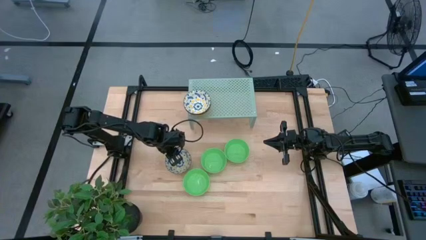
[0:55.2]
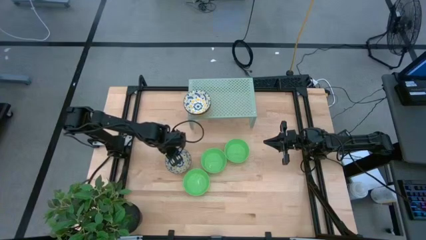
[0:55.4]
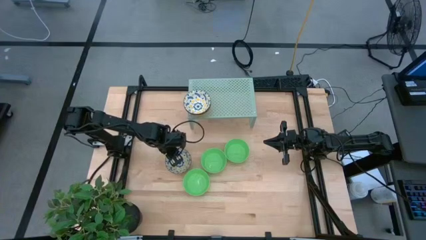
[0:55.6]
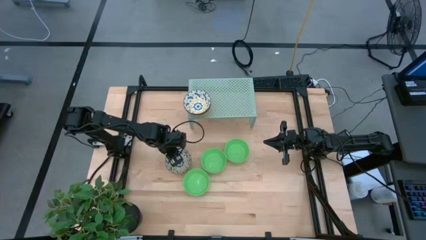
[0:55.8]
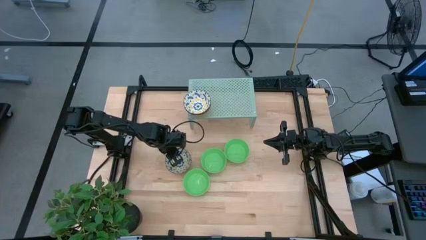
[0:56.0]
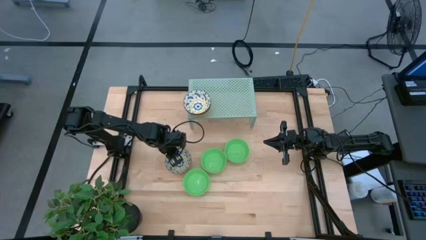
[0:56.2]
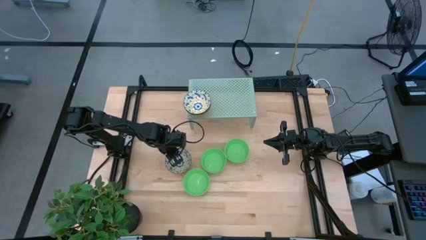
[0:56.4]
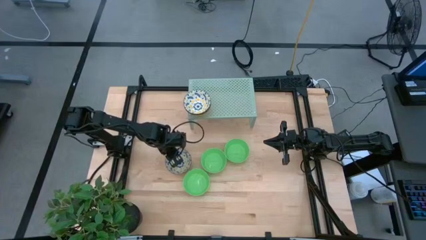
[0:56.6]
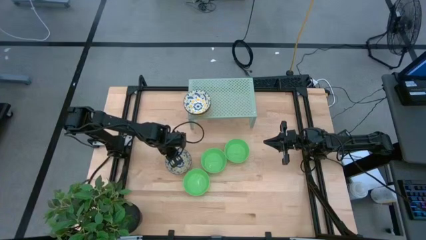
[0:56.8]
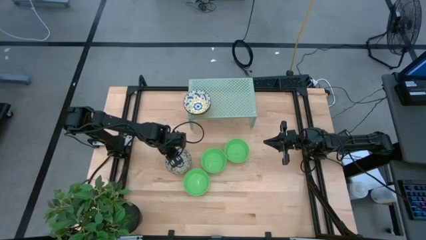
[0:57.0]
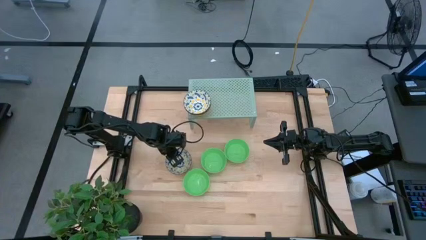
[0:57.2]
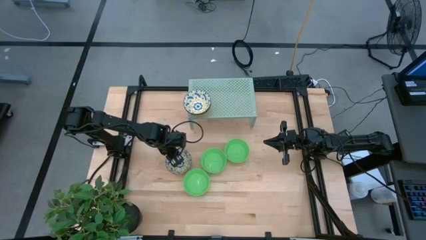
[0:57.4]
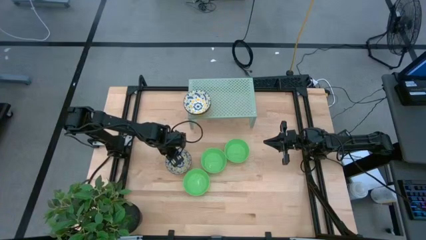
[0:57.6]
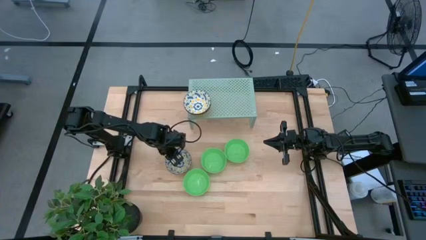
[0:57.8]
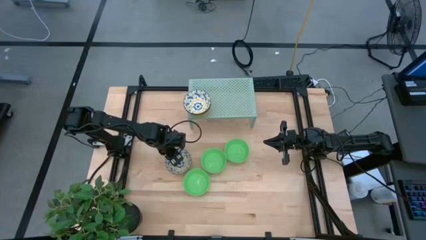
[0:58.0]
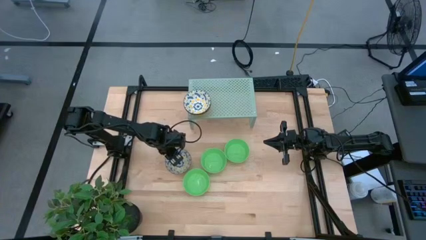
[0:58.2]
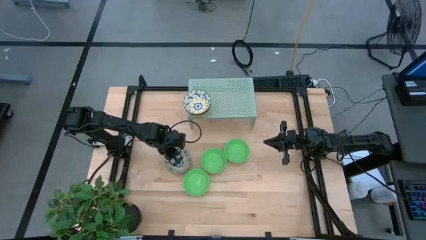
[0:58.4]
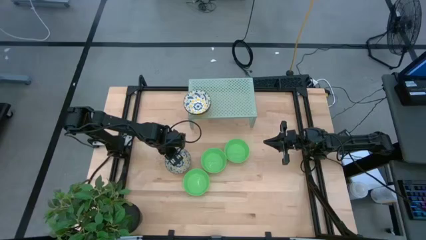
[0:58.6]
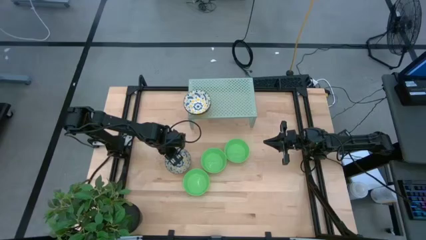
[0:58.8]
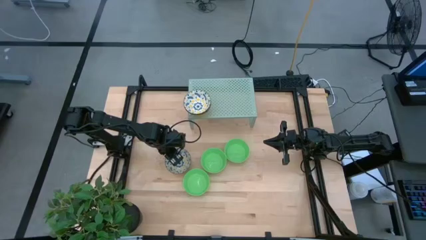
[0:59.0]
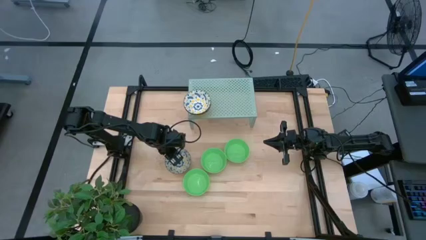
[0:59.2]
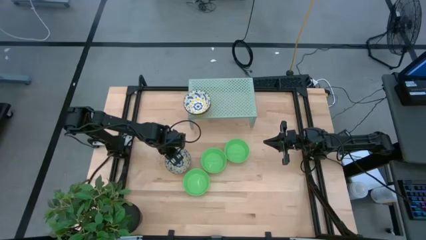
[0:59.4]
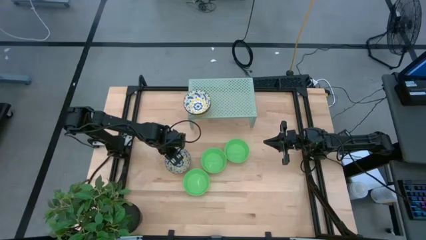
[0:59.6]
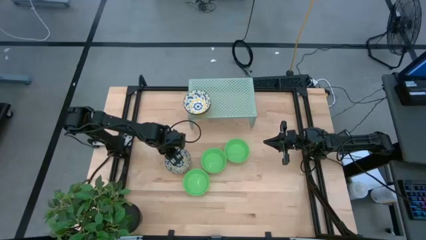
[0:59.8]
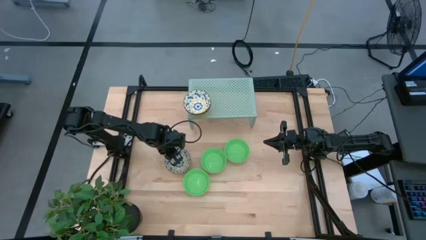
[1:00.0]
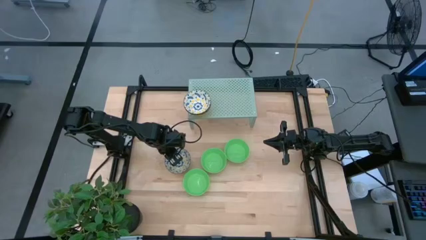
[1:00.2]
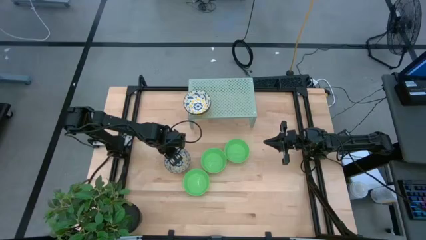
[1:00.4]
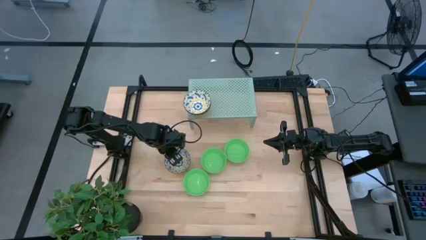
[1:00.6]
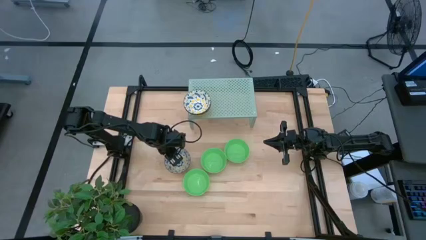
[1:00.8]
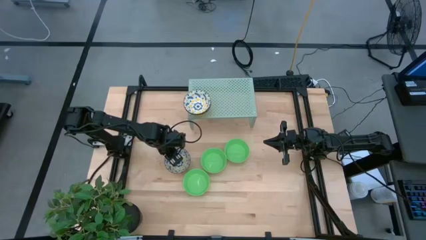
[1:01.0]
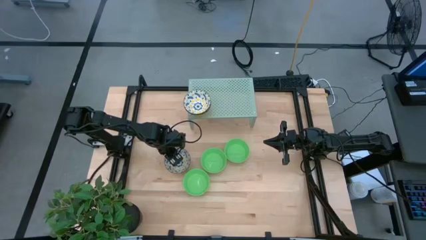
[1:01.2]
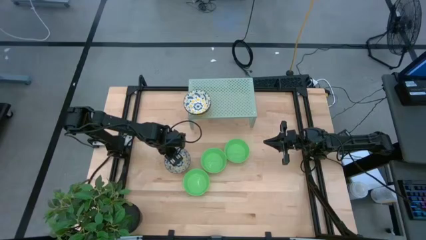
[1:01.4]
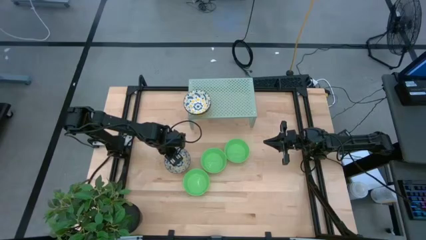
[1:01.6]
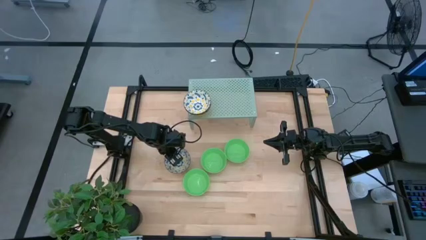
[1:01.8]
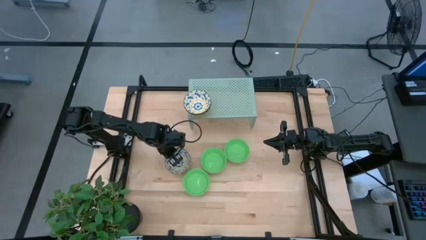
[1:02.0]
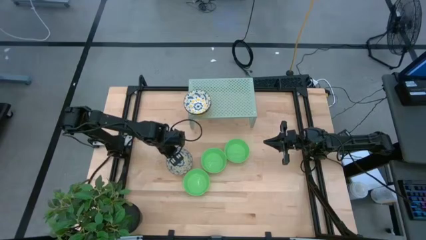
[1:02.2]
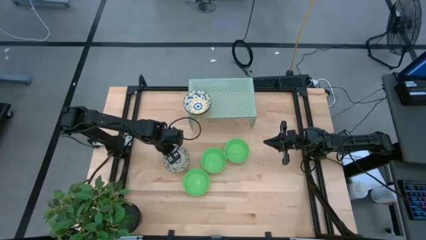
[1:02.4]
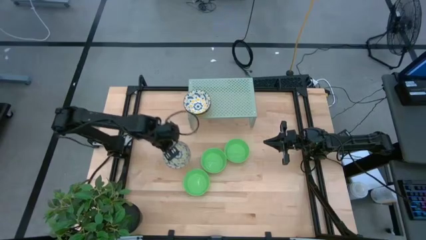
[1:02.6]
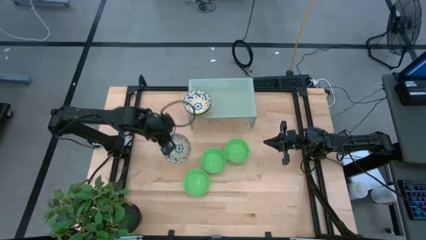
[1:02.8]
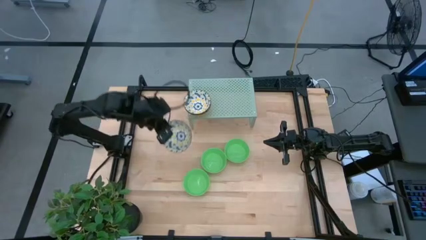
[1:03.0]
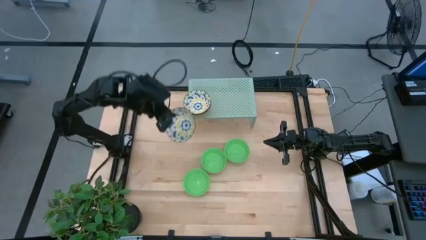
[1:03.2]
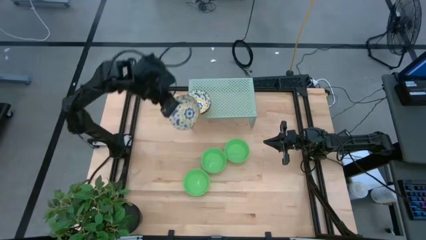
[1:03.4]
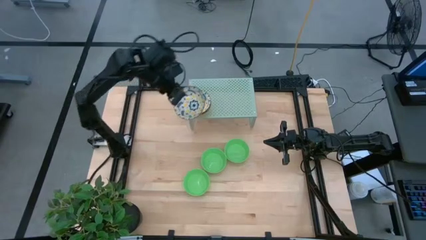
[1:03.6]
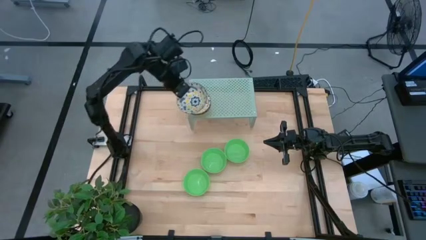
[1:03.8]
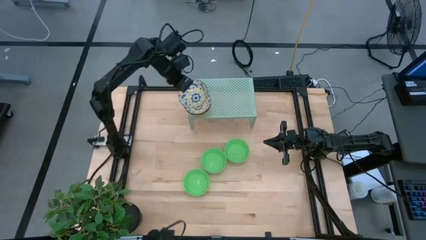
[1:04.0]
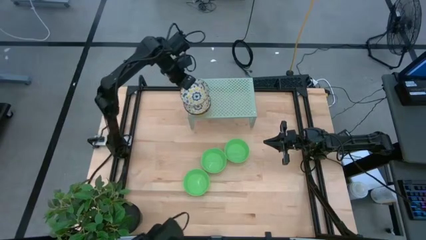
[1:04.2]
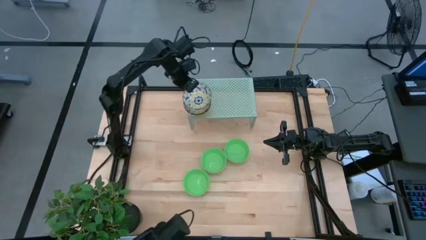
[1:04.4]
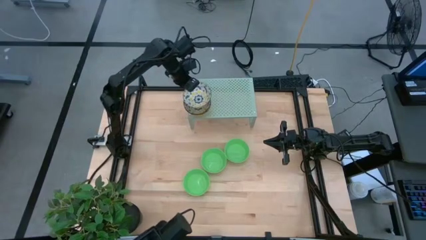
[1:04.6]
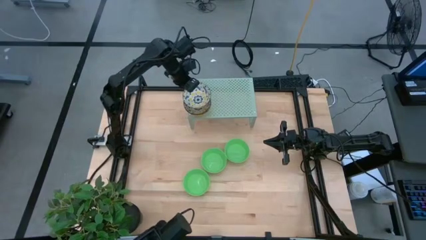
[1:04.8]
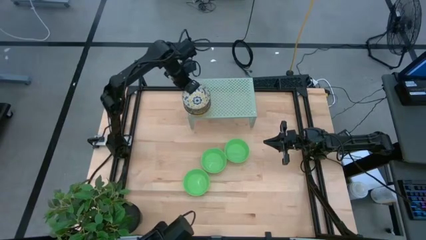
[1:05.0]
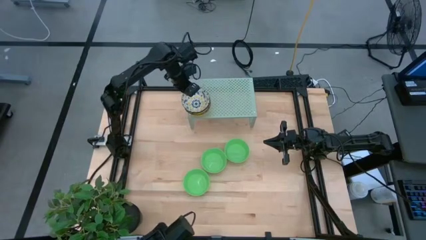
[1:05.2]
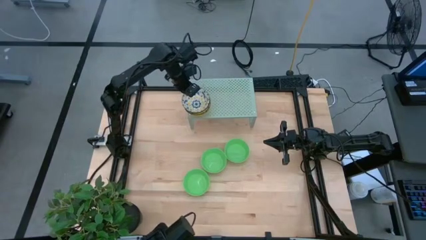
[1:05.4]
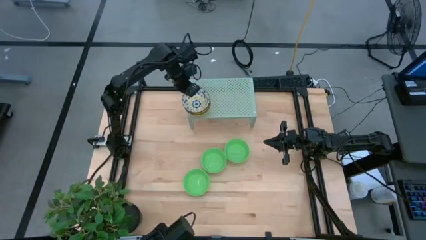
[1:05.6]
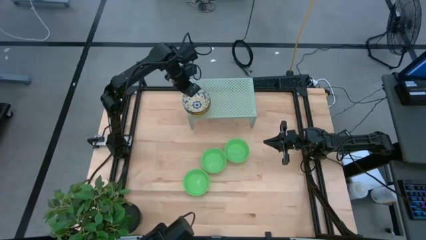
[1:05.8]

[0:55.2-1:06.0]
Task: Pick & Place Mini bowls
Stack the white patterned bowl on top of the white patterned bowl on the shelf

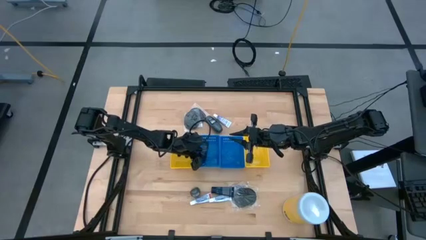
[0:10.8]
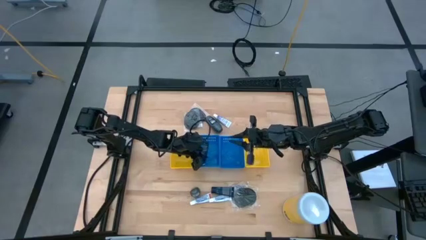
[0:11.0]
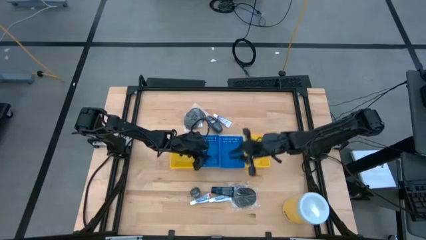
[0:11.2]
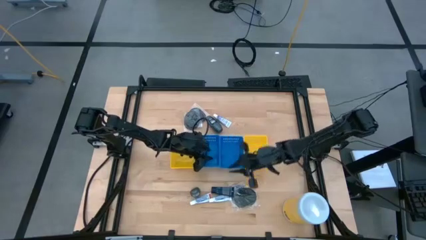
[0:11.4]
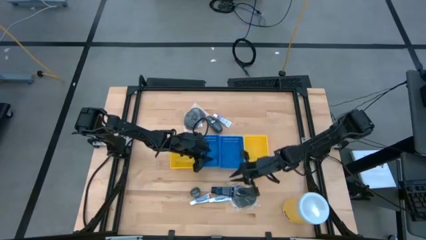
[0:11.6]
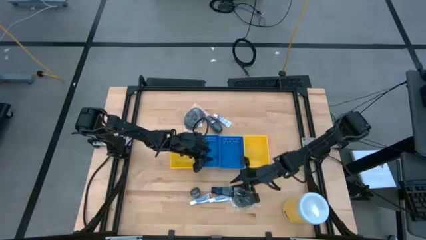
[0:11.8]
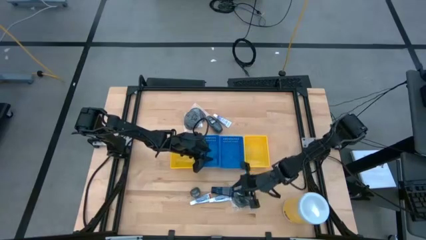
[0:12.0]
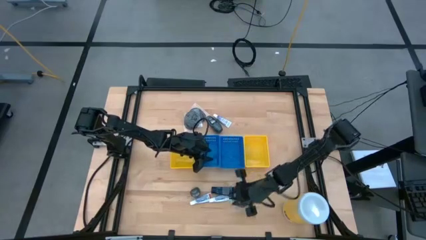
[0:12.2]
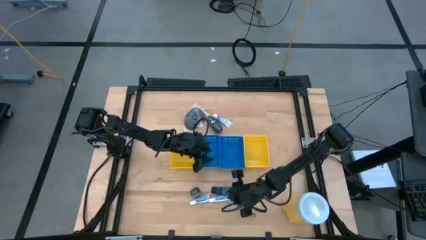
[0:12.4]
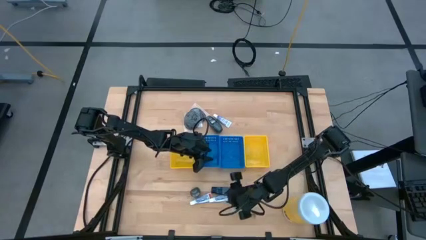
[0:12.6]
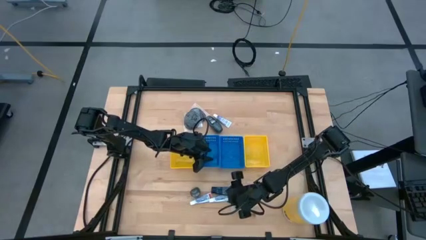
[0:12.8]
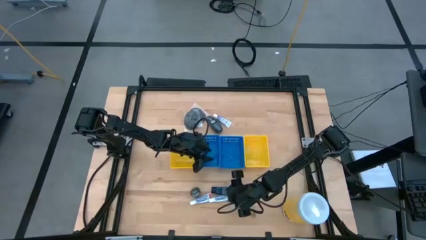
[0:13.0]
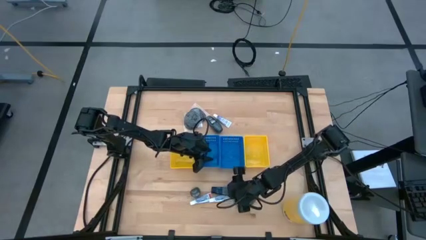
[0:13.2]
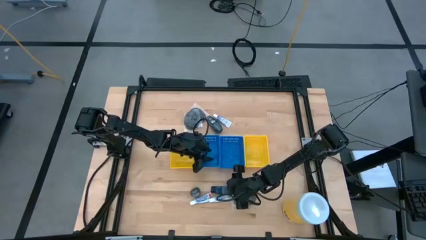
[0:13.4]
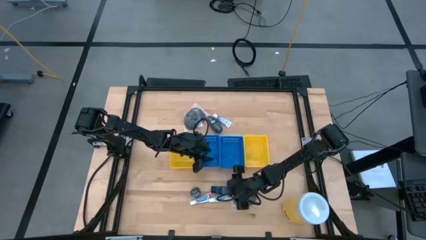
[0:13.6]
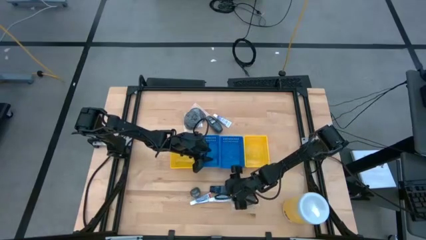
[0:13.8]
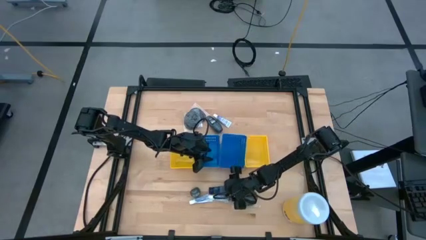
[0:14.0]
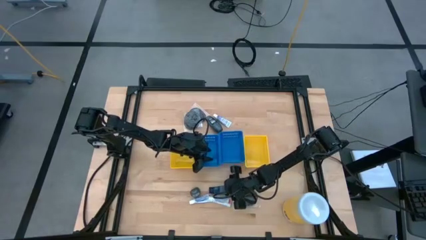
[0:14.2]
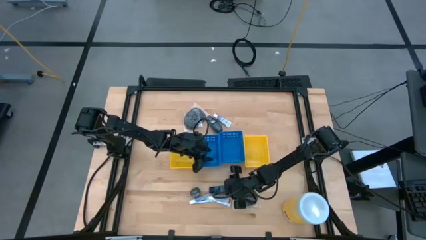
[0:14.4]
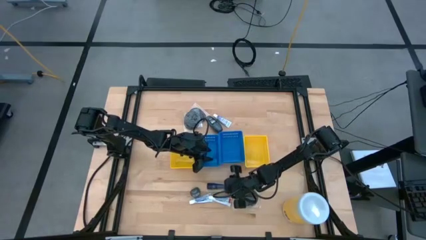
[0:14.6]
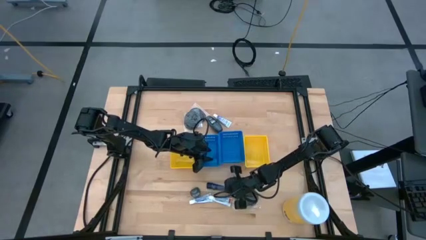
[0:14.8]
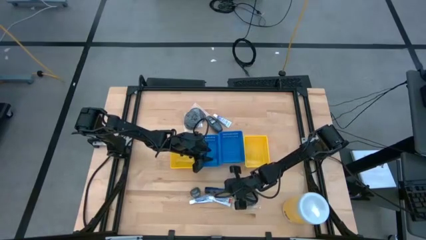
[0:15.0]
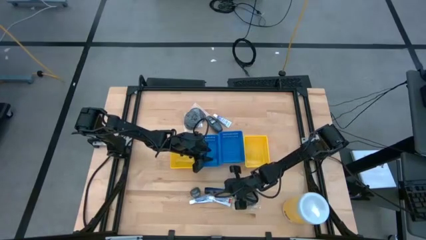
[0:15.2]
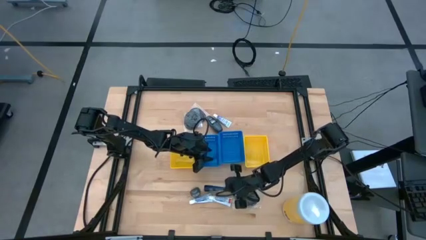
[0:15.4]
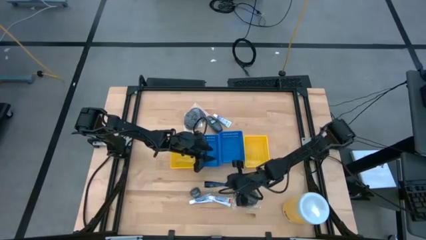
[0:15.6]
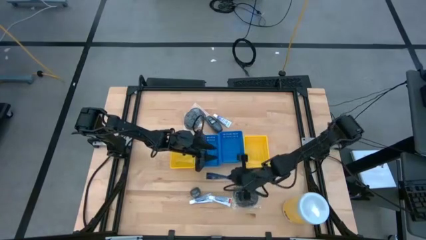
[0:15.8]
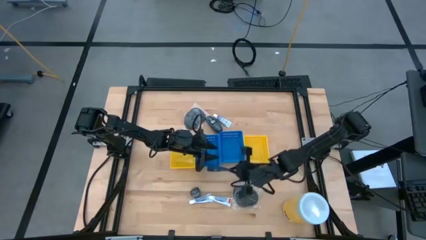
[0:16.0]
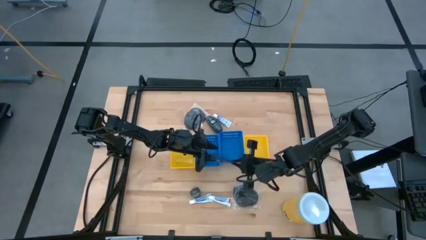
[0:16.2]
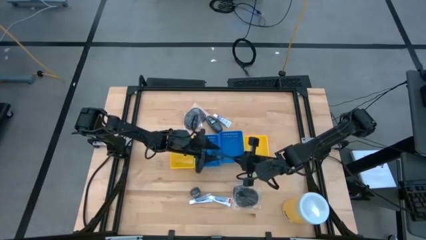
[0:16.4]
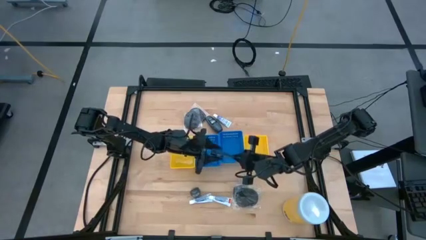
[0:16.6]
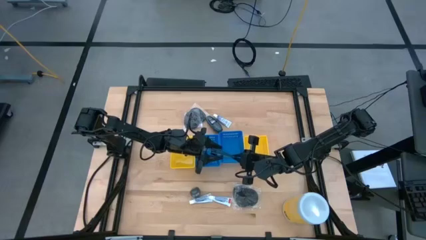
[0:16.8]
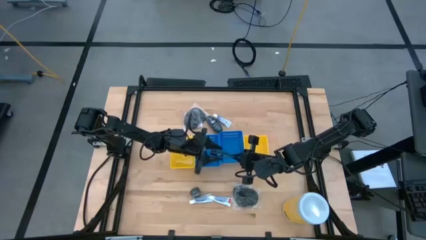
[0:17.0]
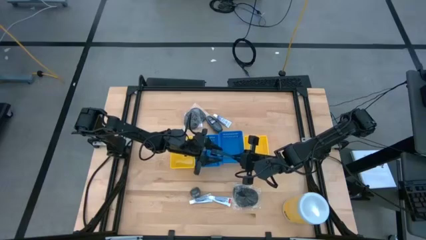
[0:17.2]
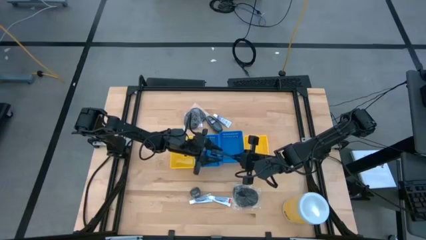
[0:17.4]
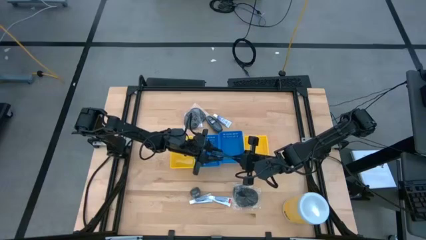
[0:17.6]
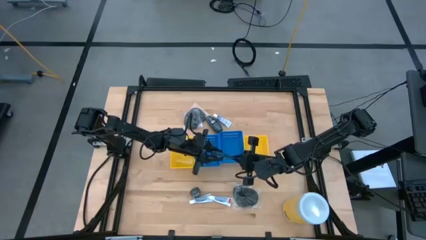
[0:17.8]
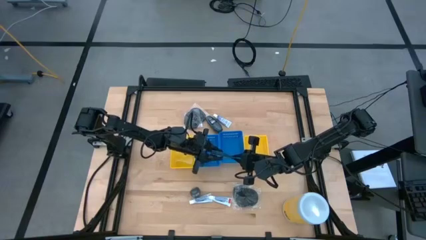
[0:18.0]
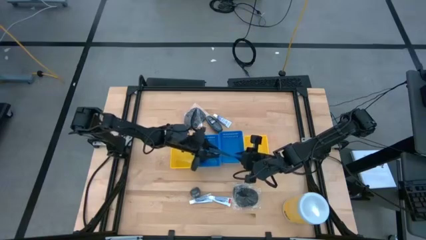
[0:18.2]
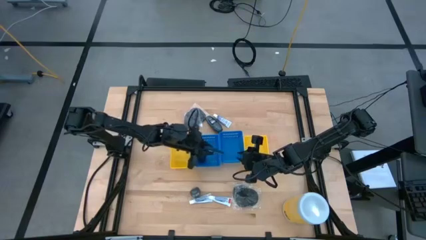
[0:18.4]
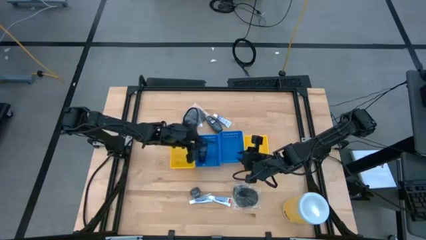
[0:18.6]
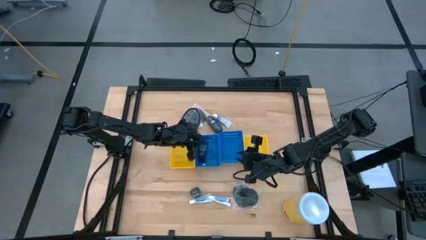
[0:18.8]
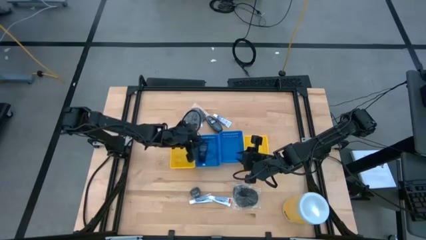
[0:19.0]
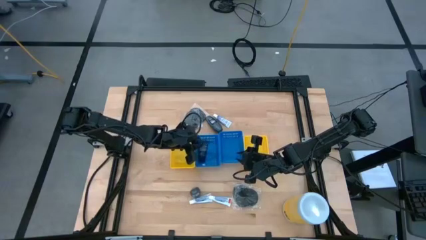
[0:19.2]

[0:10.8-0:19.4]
Task: Pick & Place Travel size toiletries
Put the dark blue shaving cream into the left blue bin
